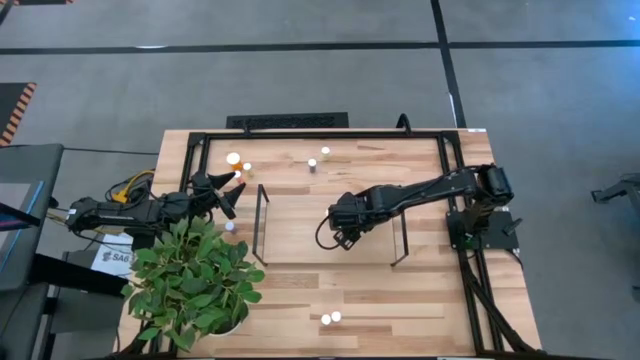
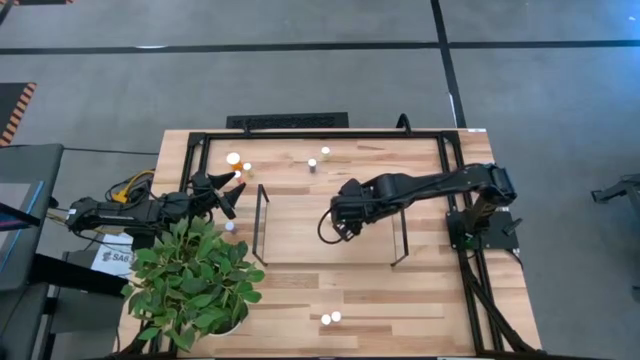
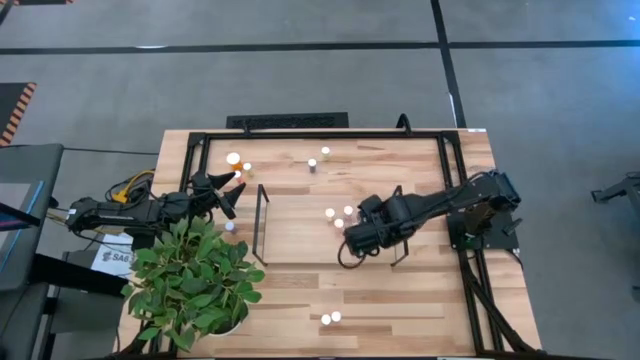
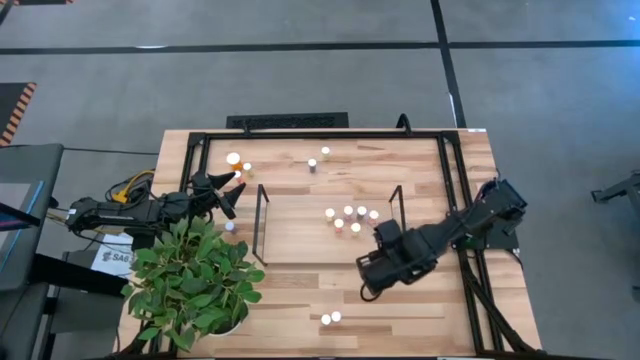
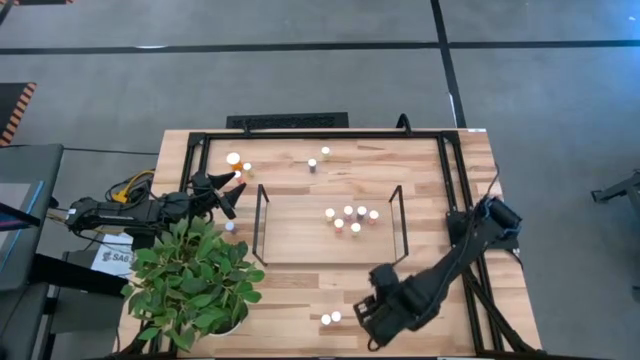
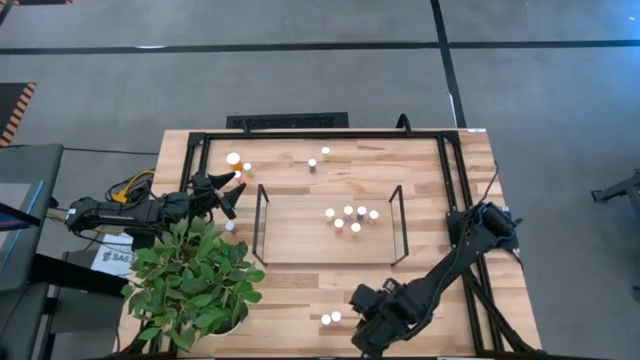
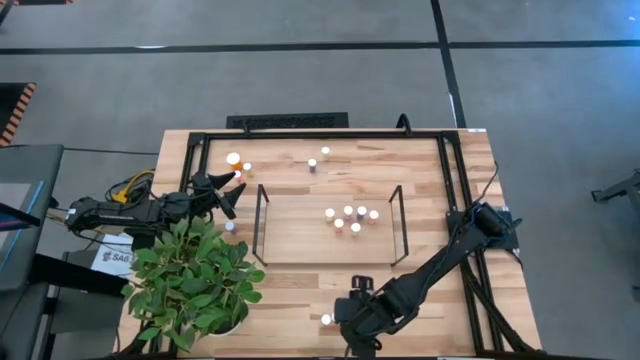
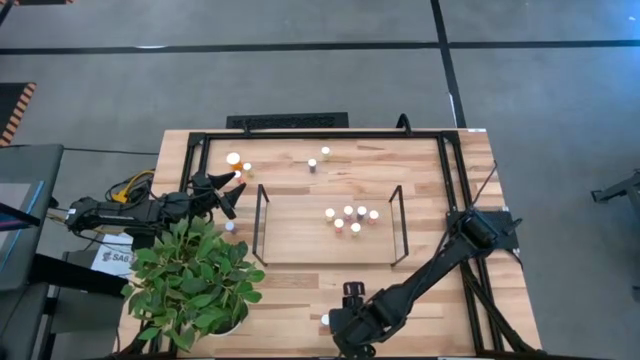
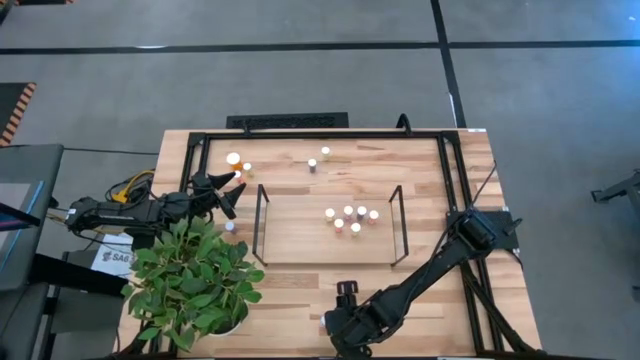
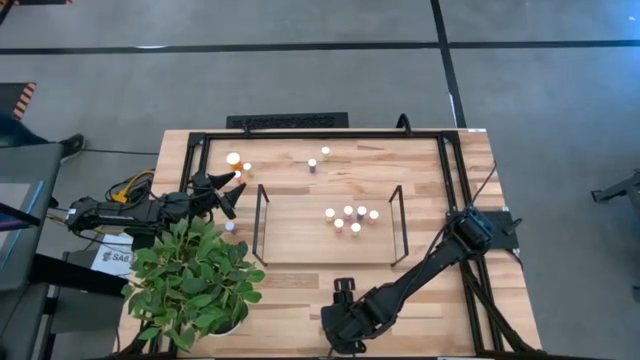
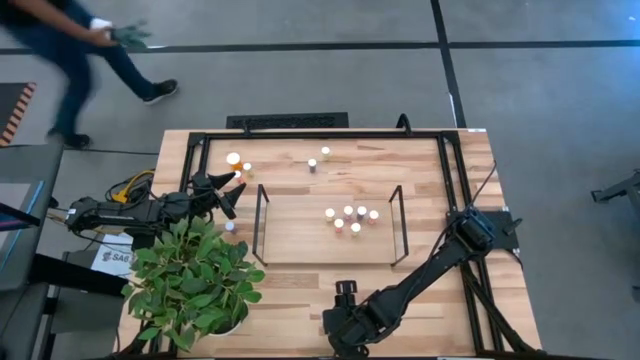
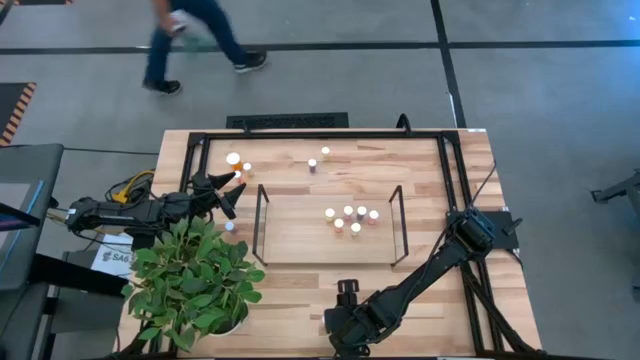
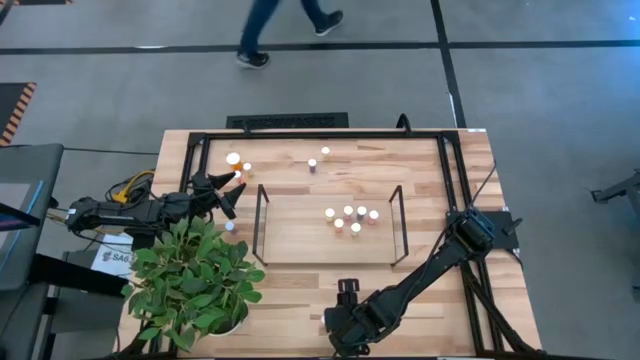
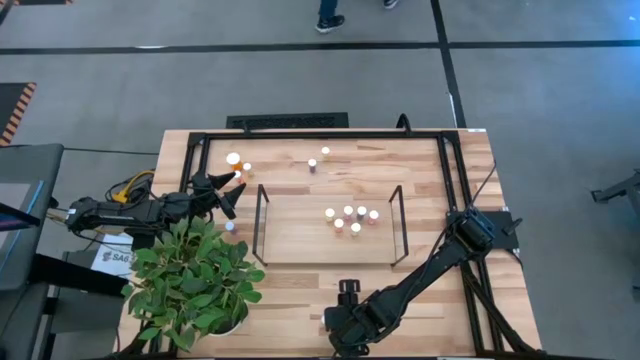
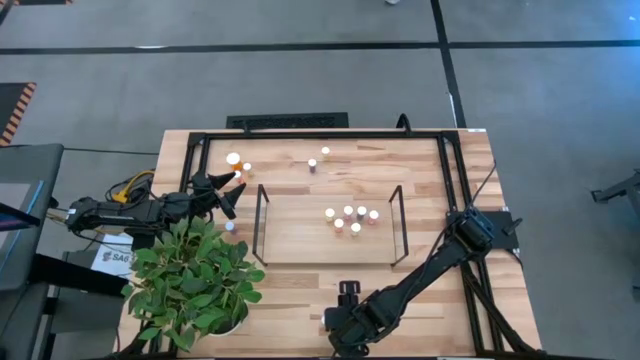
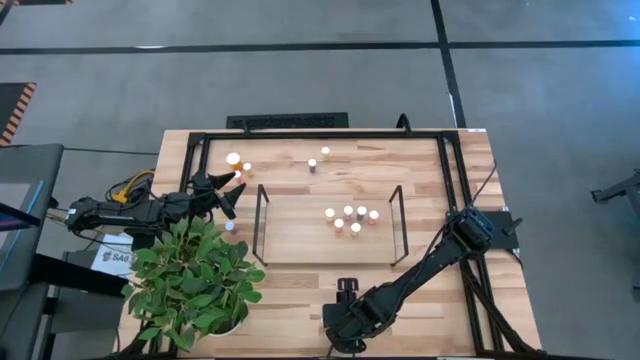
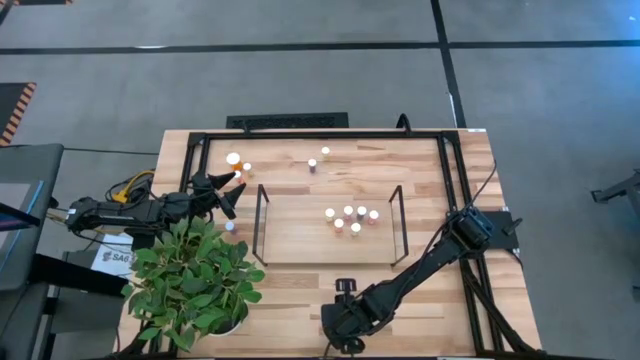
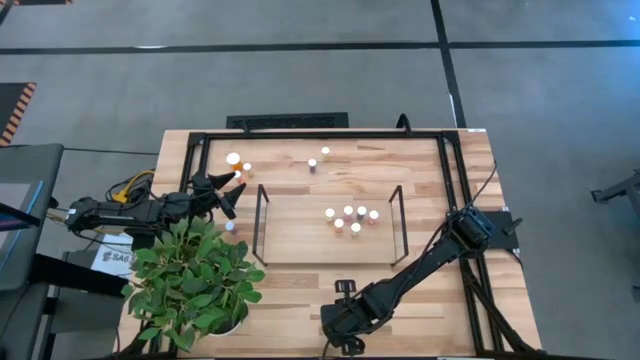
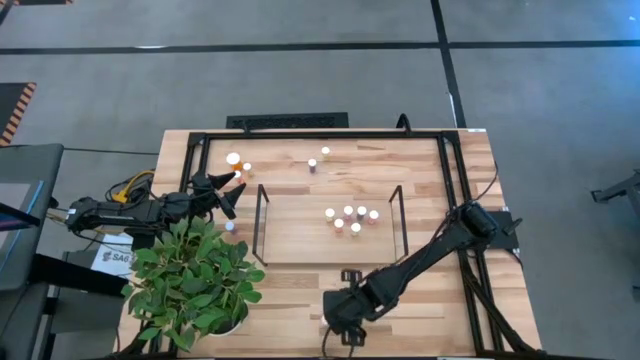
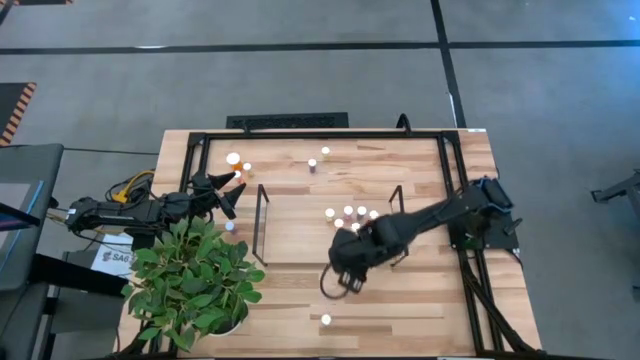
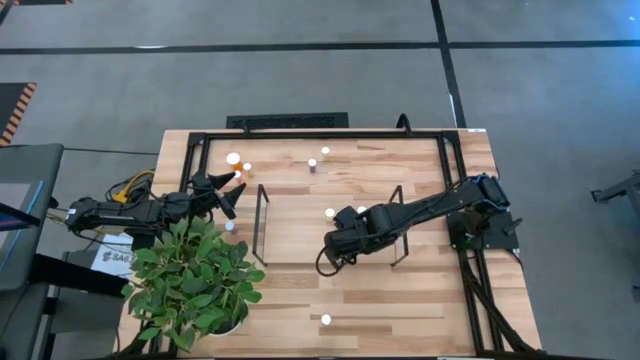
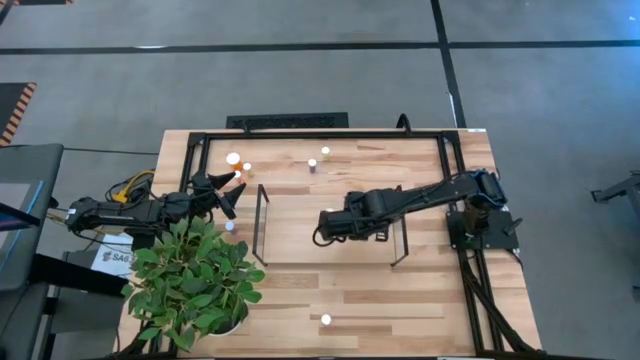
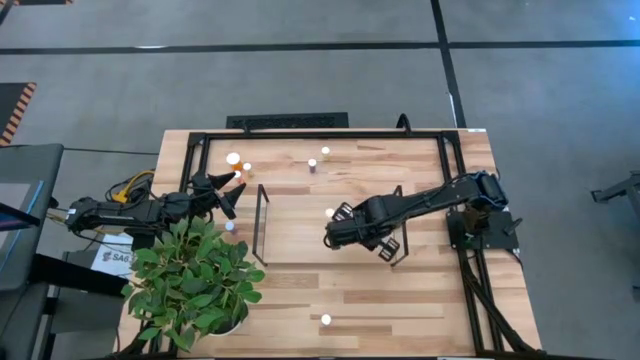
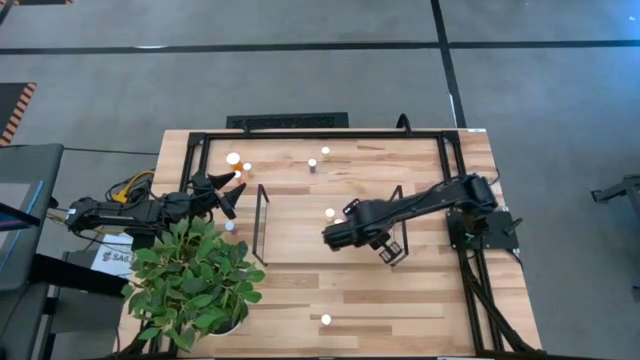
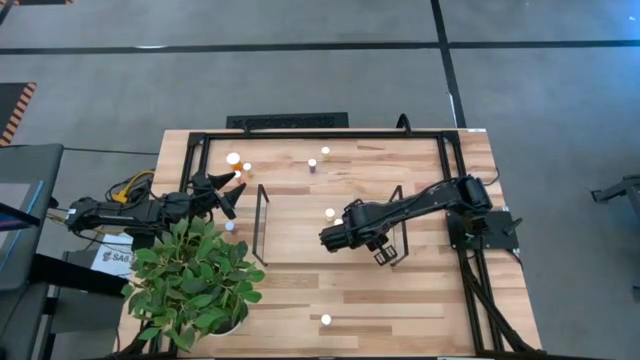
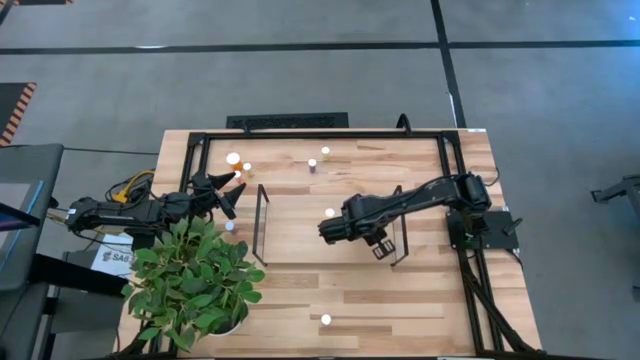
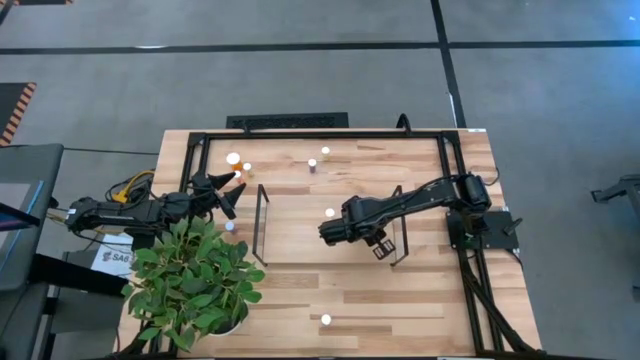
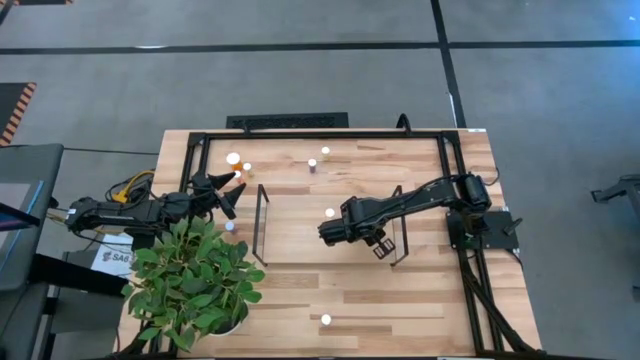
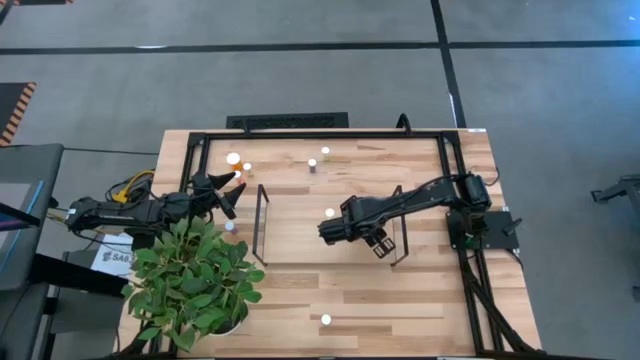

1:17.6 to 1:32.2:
Task: Pick and place medicine bottles onto shelf by color
Put the red pill bottle on the shelf

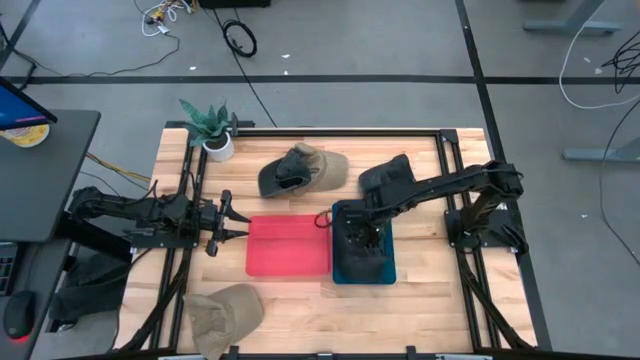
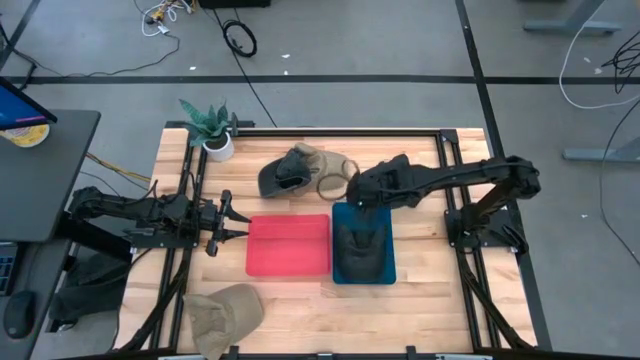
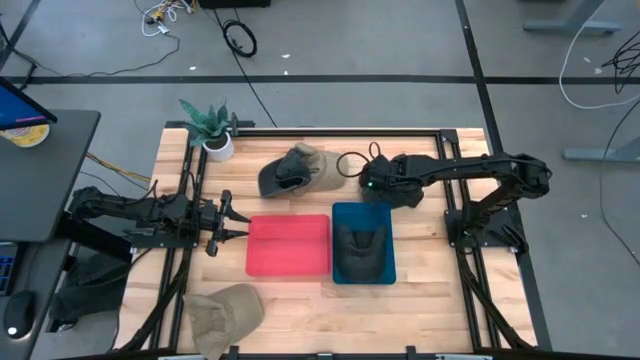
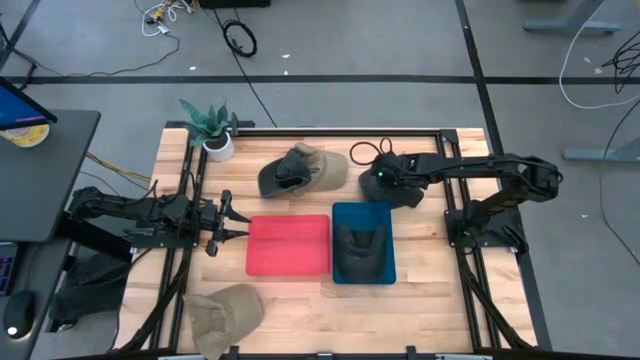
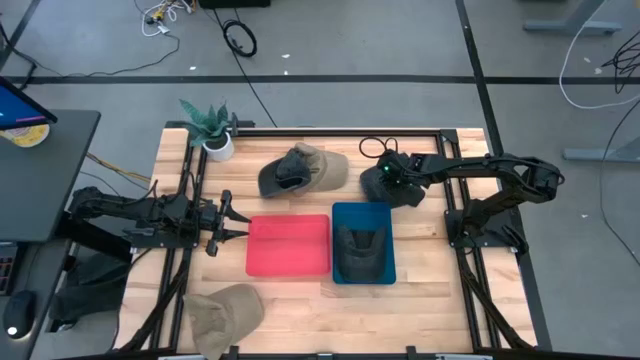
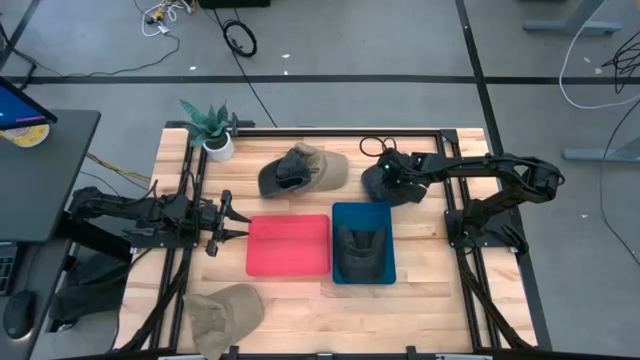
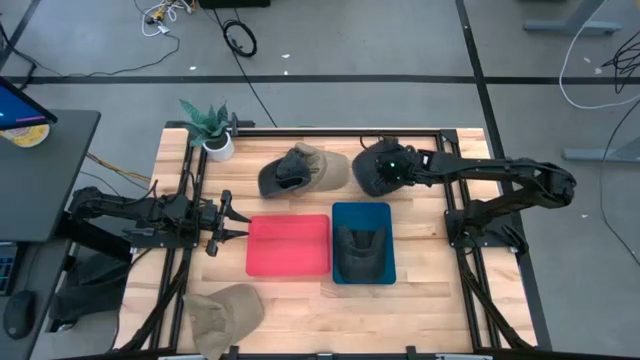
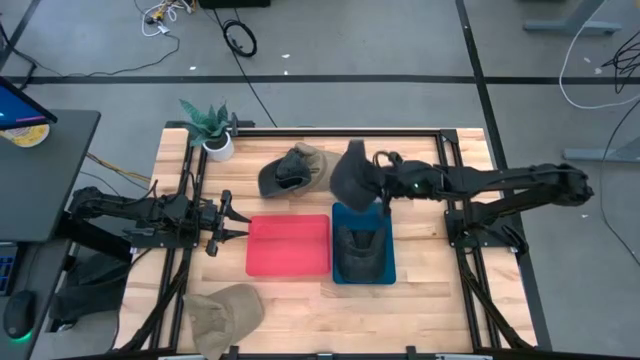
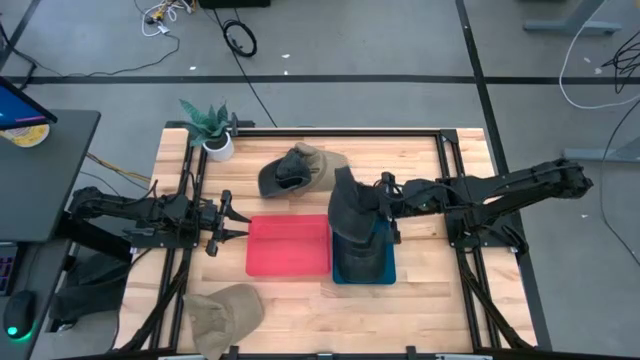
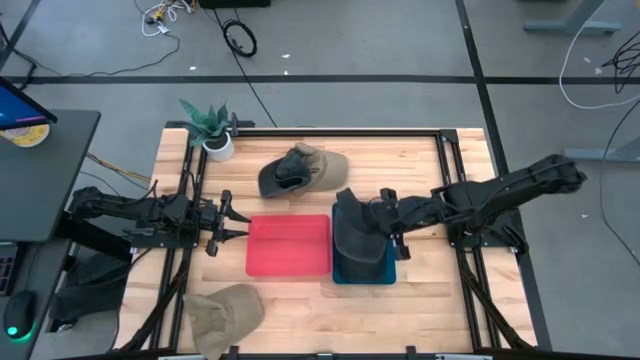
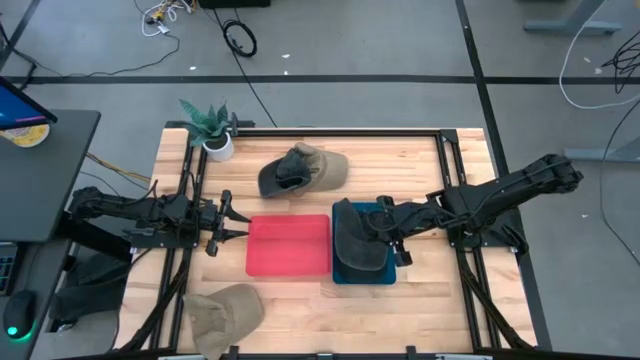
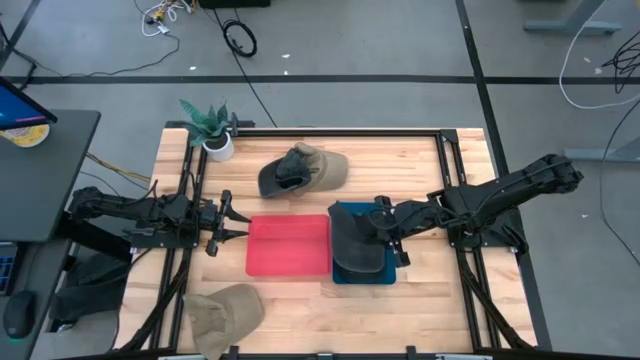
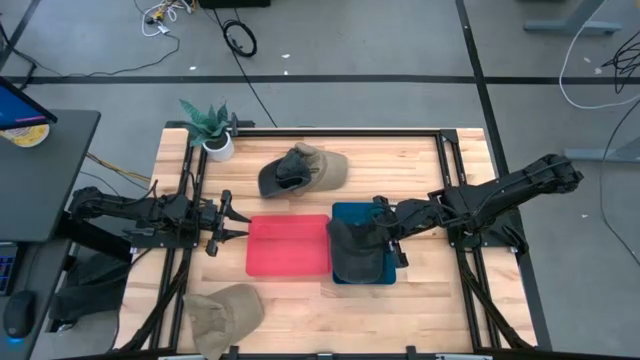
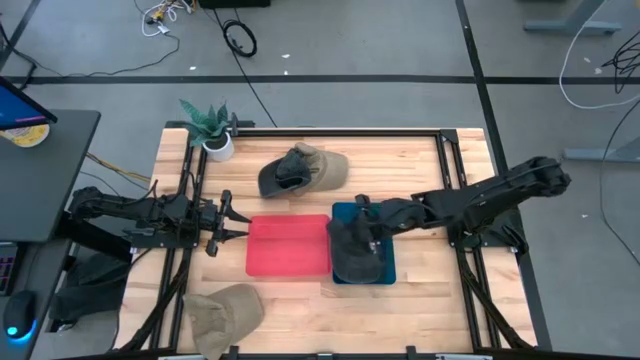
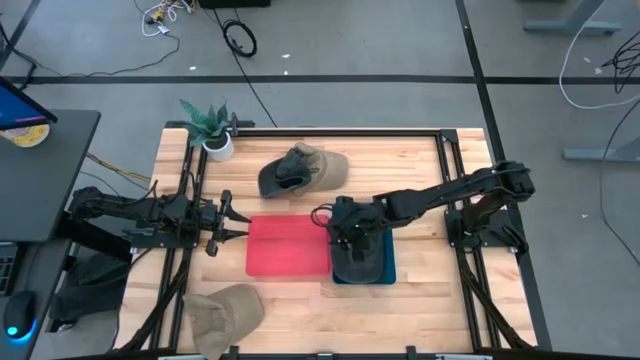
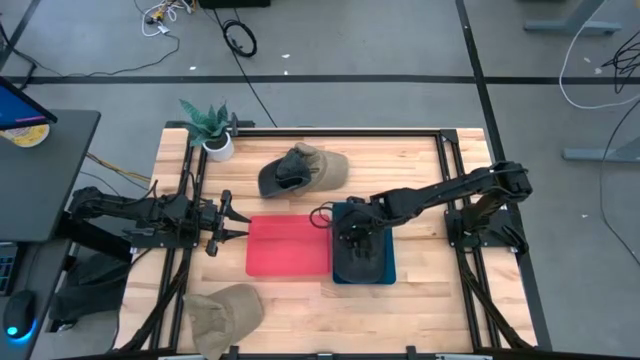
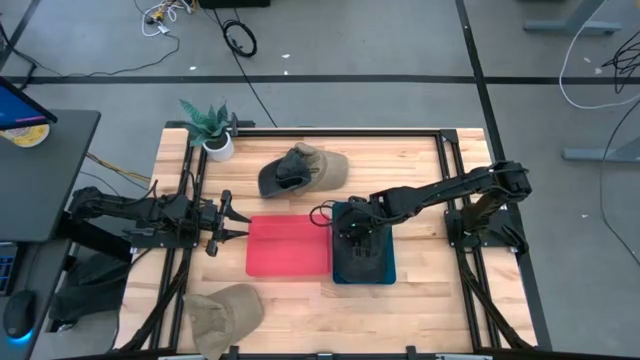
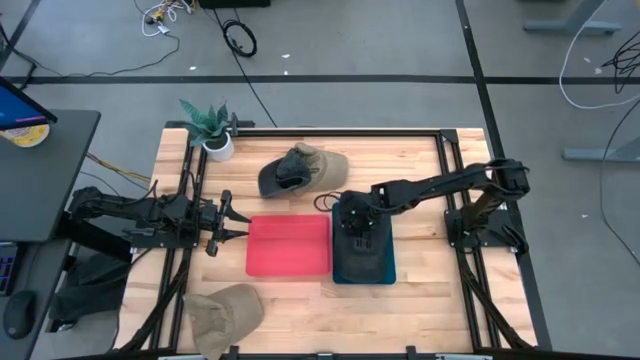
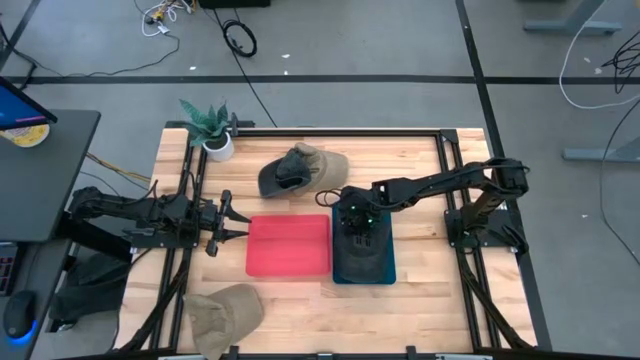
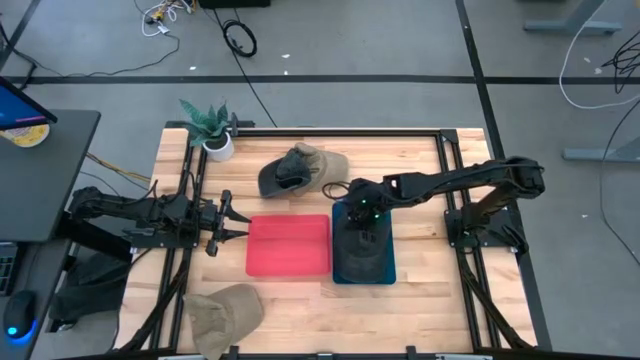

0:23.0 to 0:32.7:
Task: Pick & Place hat
Put the top black cap into the blue bin
